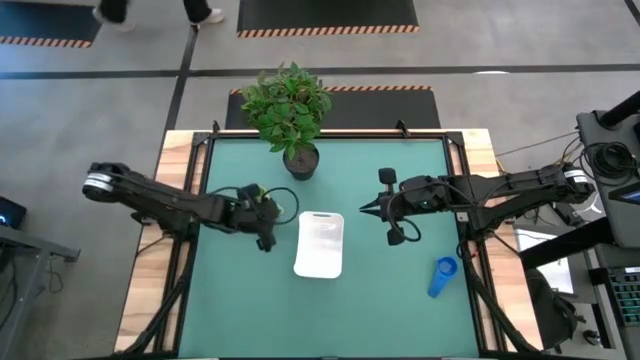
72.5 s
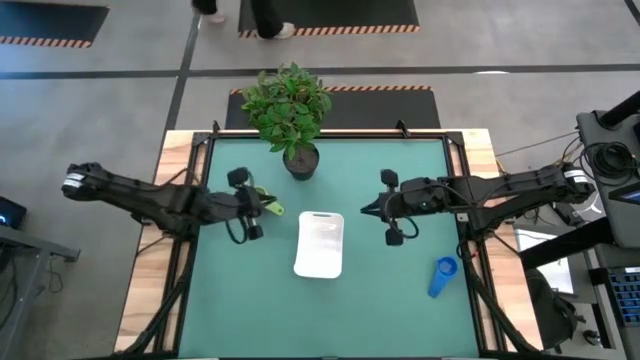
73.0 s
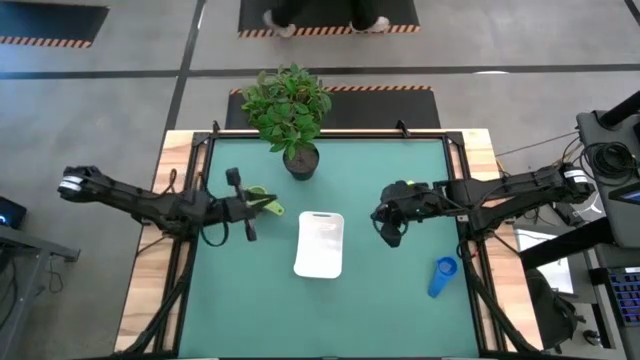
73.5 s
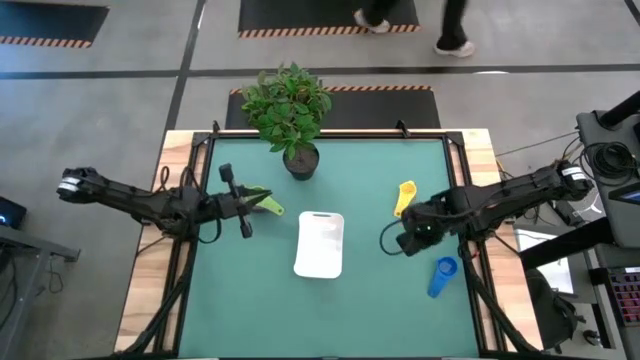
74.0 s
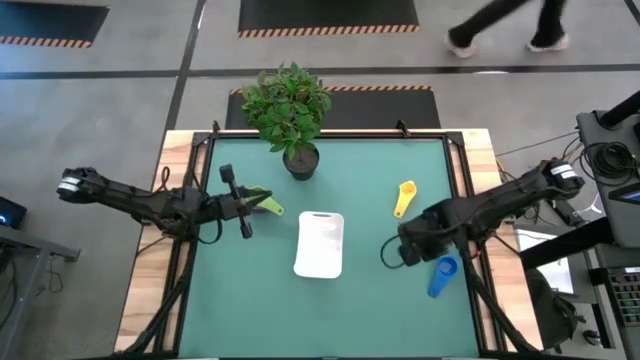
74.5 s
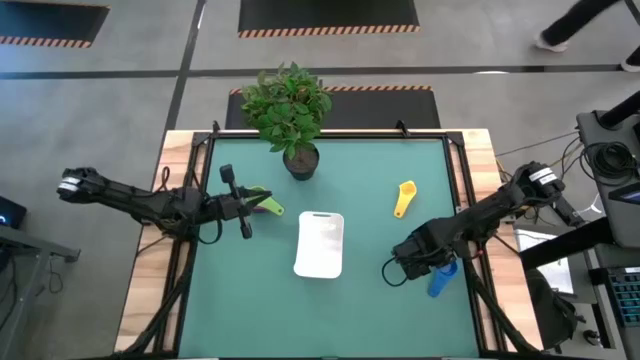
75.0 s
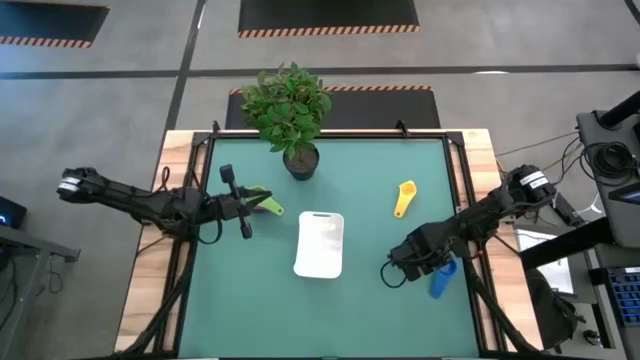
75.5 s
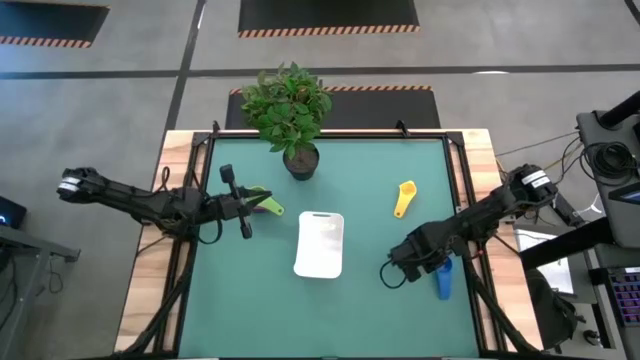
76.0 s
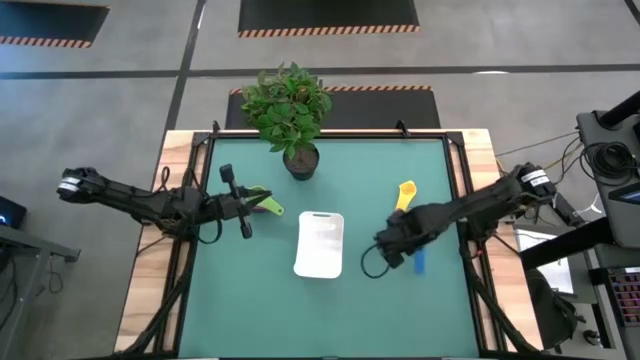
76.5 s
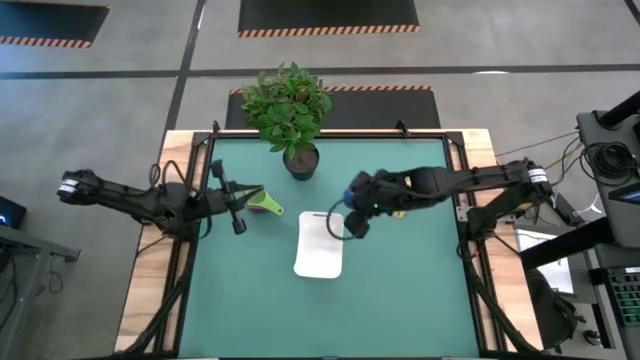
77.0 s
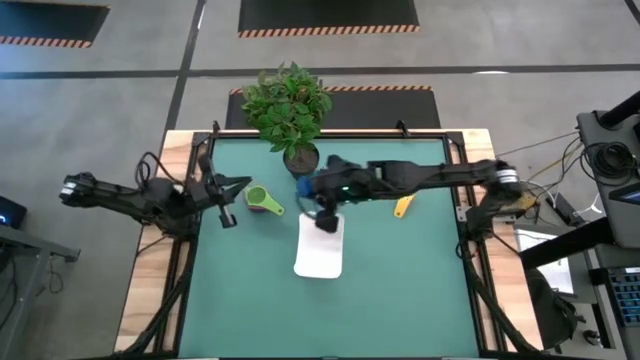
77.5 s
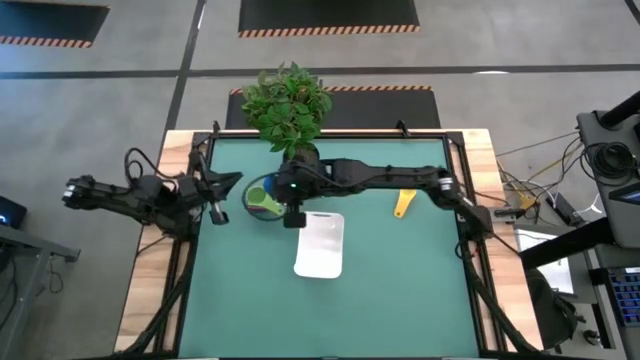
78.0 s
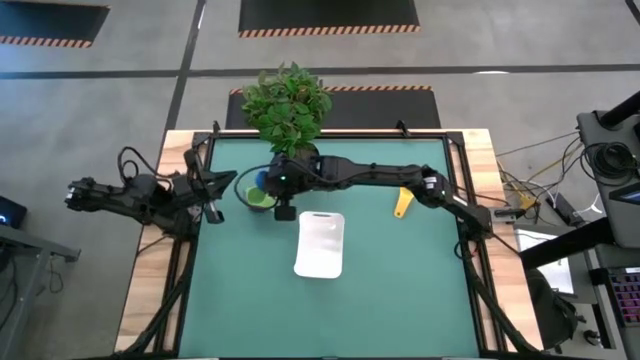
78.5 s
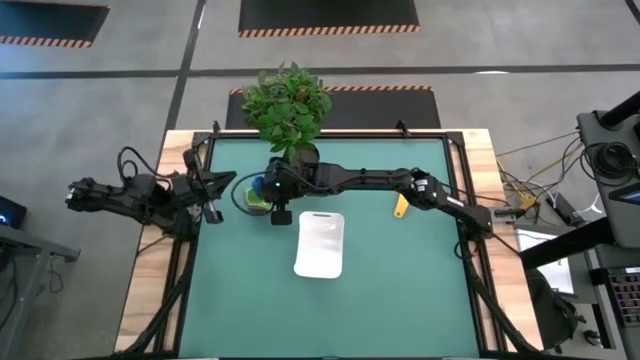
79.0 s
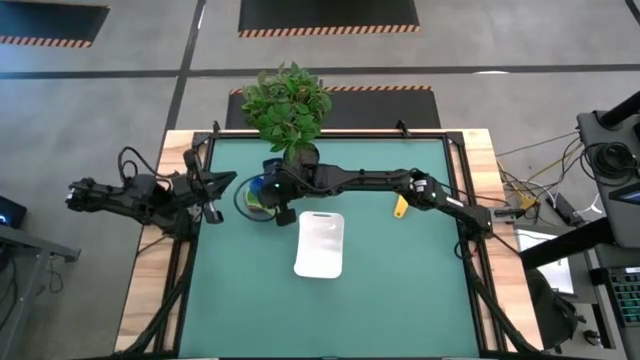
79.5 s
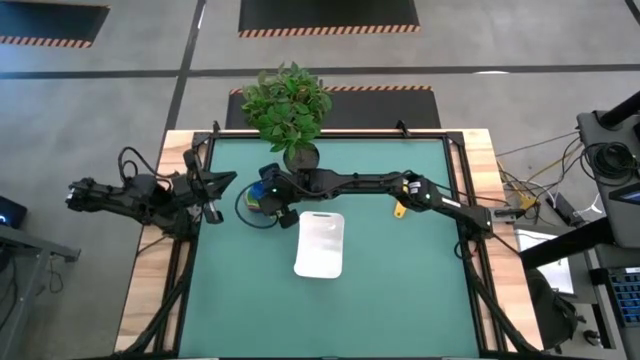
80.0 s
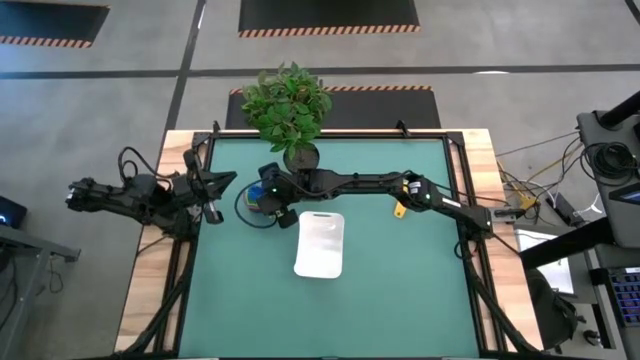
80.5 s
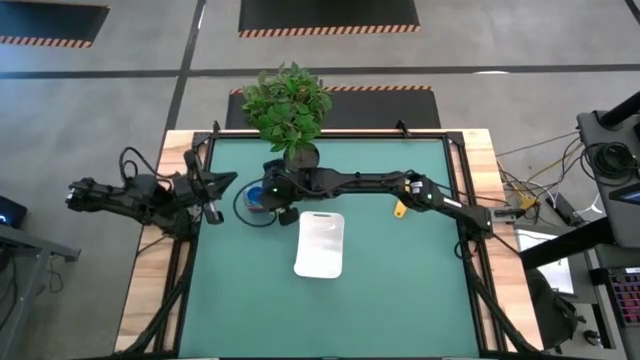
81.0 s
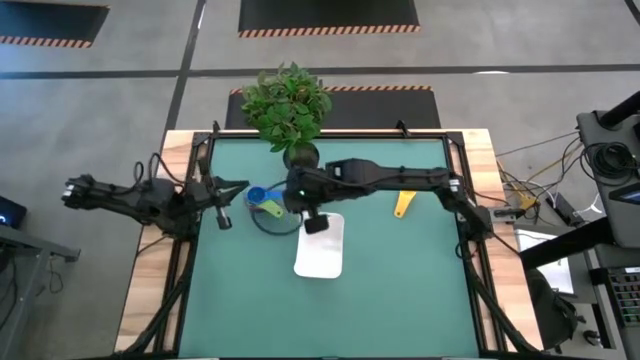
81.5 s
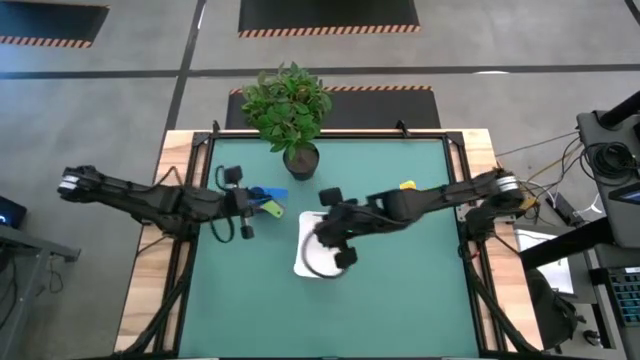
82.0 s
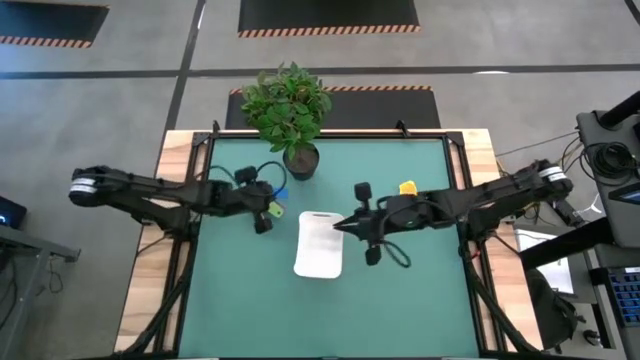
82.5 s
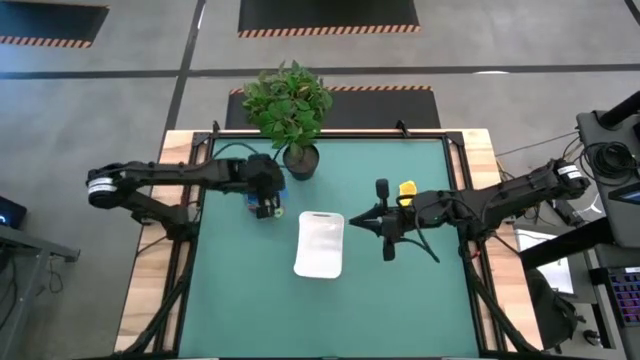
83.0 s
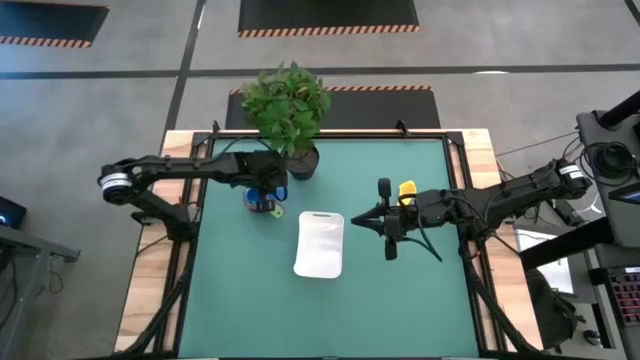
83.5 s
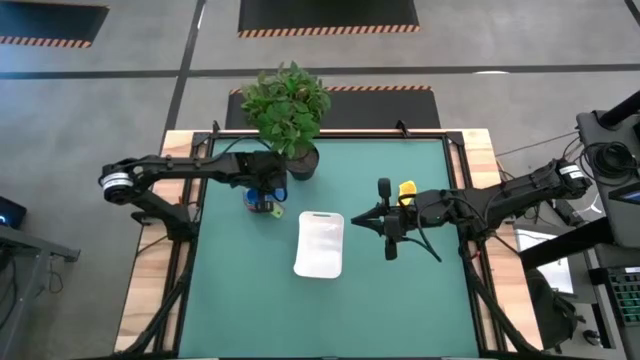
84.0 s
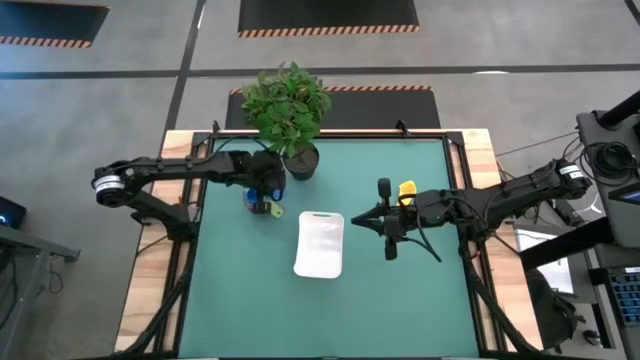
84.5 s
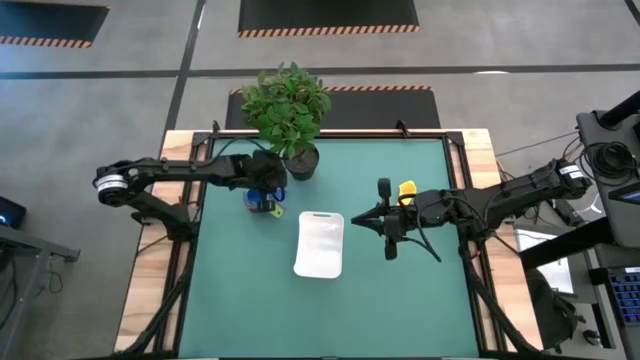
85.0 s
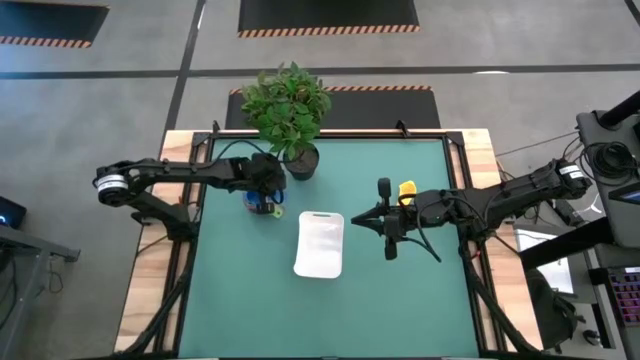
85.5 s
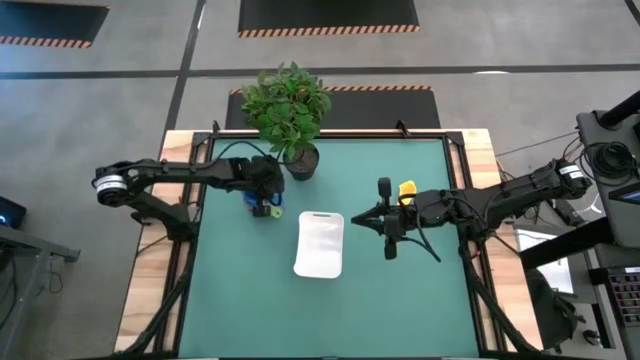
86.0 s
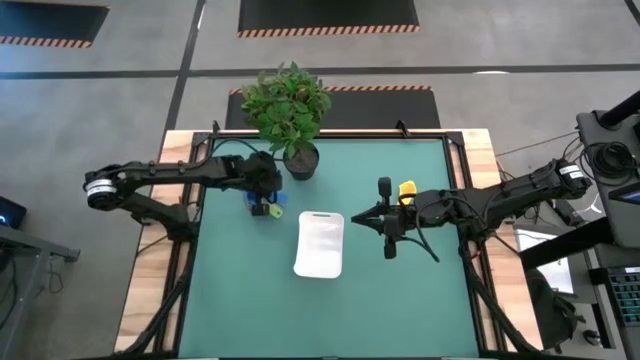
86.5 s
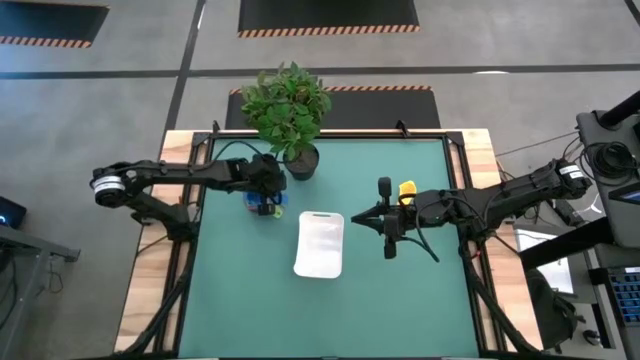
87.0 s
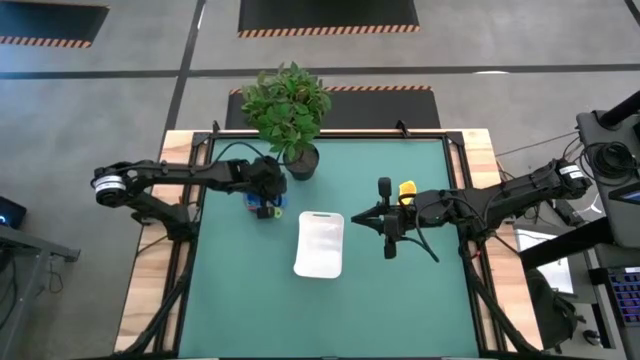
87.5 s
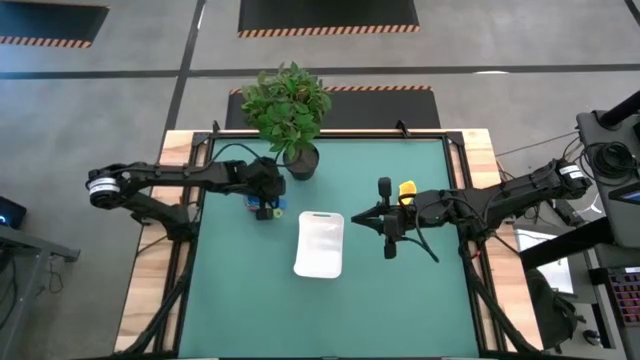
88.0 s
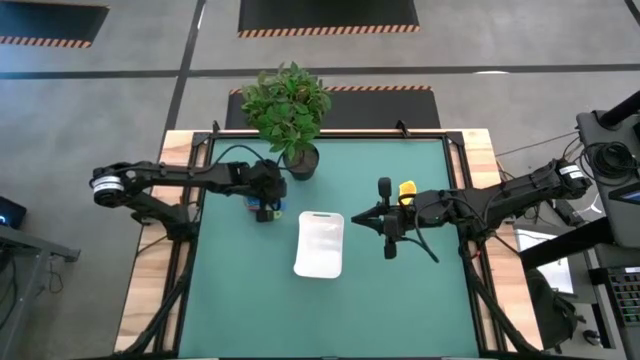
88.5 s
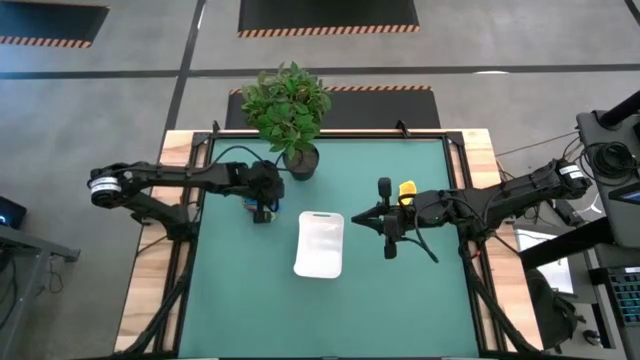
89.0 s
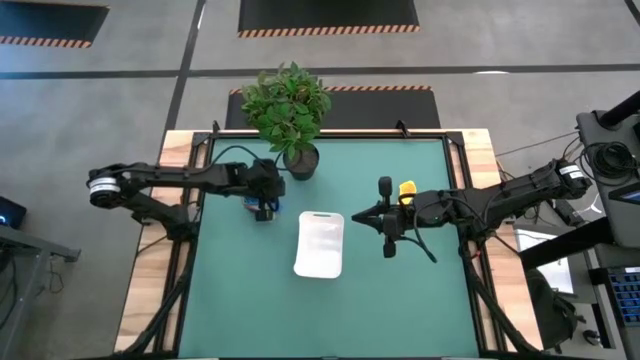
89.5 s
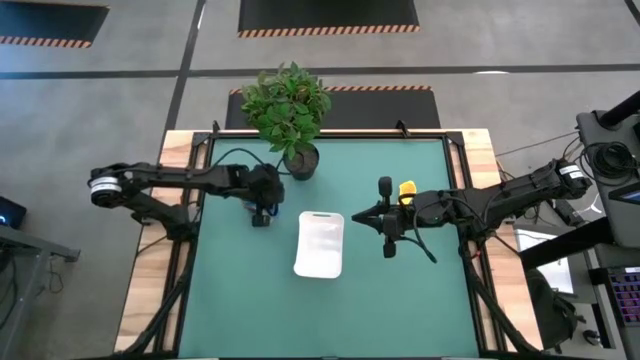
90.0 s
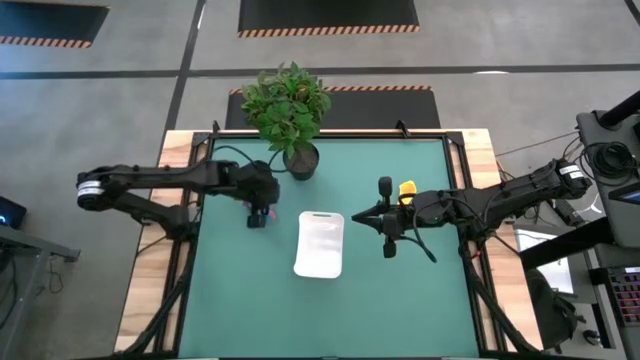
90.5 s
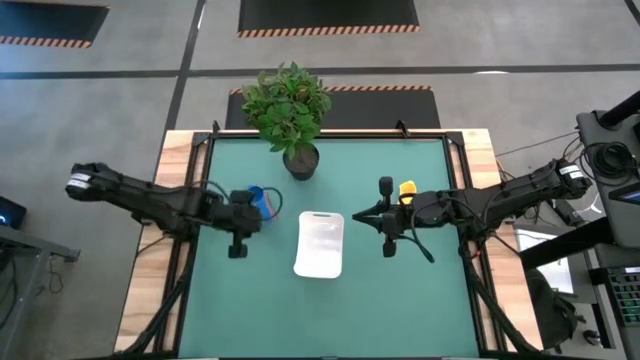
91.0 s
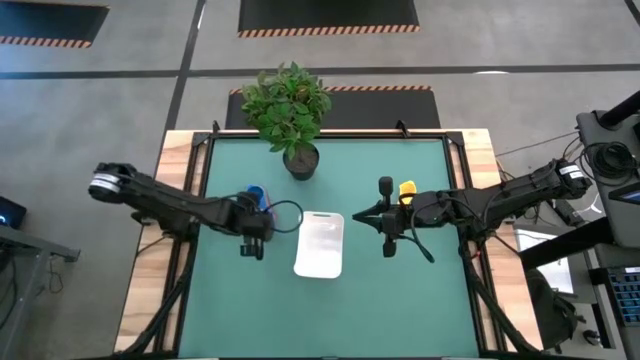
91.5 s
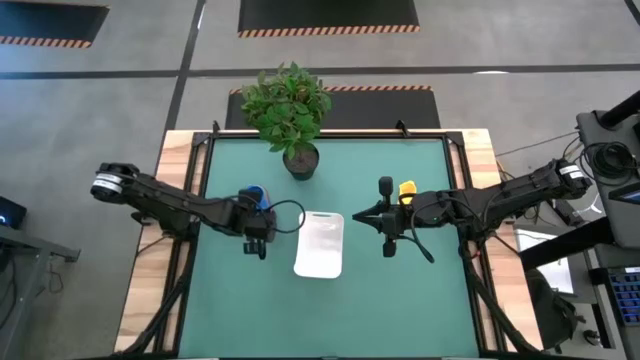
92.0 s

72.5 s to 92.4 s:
Task: Nest measuring cups in basket
Stack the blue measuring cup on top of the green measuring cup

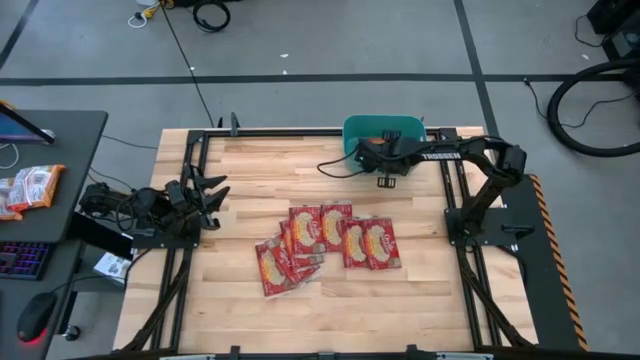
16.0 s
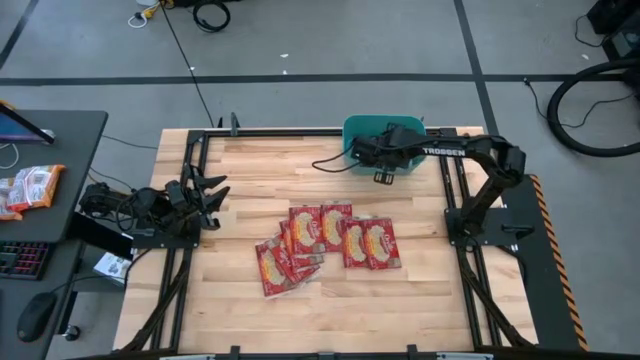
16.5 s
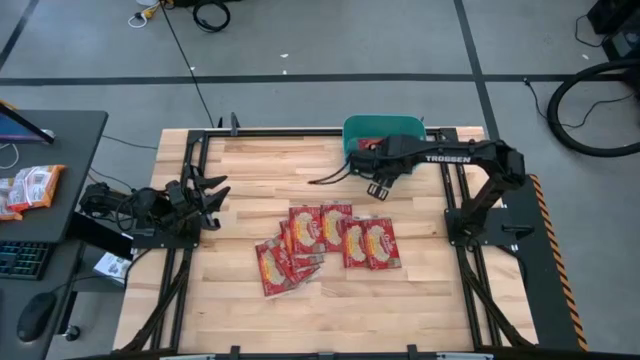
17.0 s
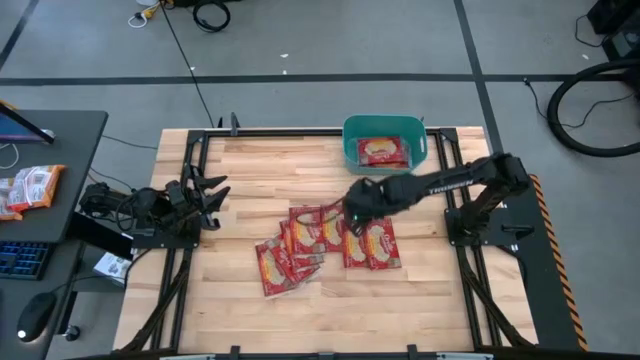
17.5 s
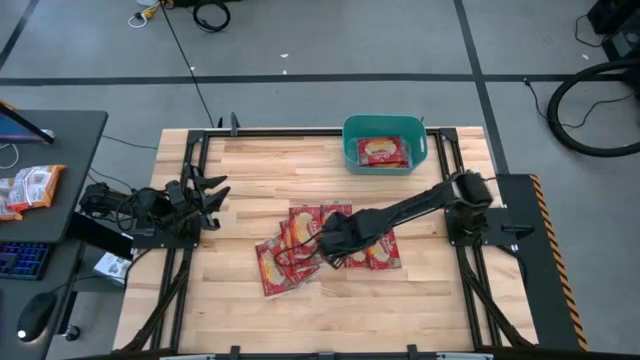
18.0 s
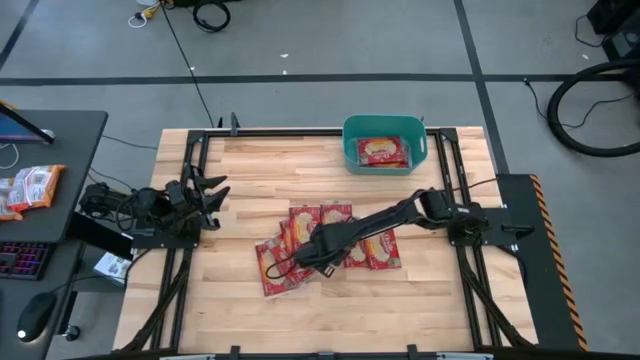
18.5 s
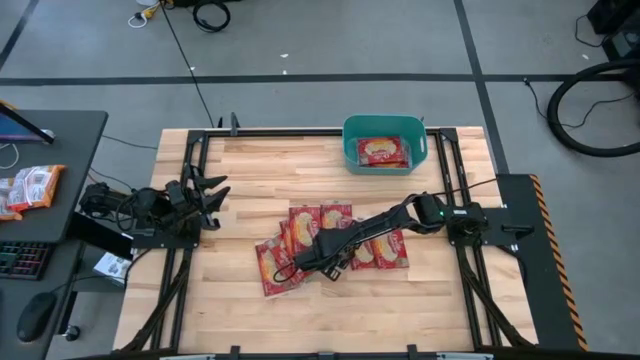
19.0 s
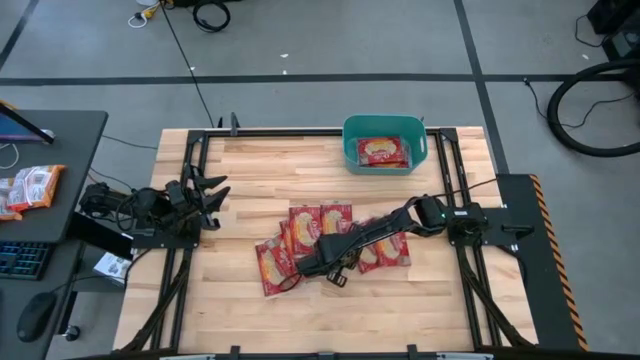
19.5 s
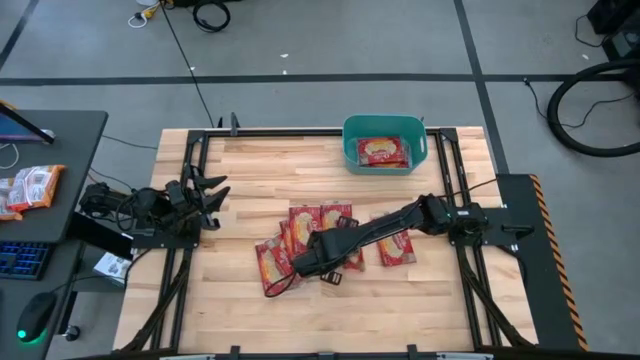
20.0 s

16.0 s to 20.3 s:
Task: Sort popcorn bags into baskets
Put the popcorn bag into the green bin
